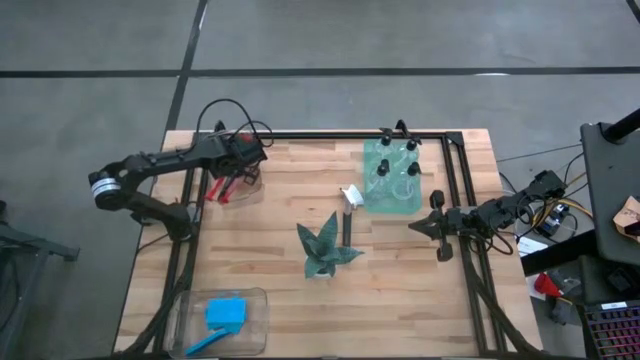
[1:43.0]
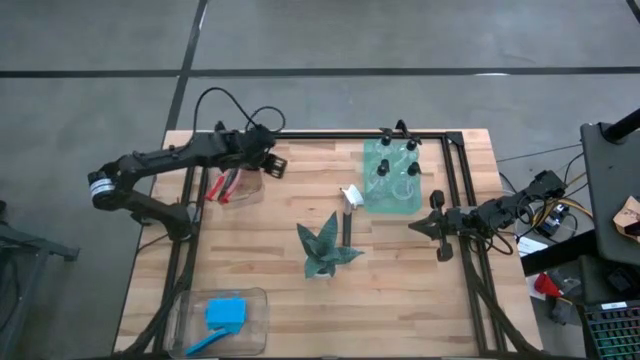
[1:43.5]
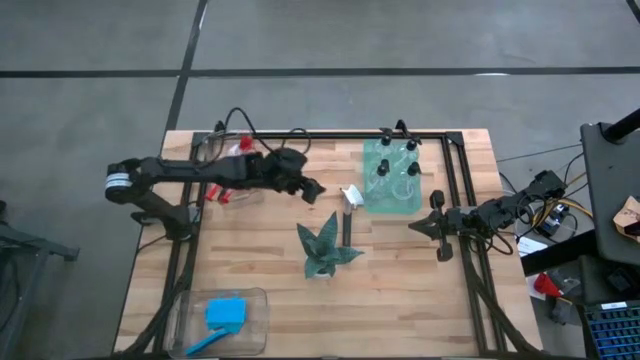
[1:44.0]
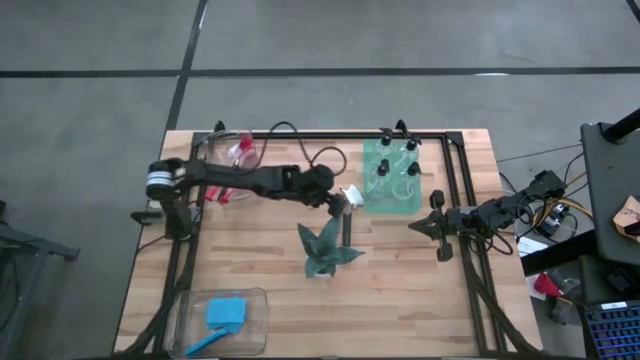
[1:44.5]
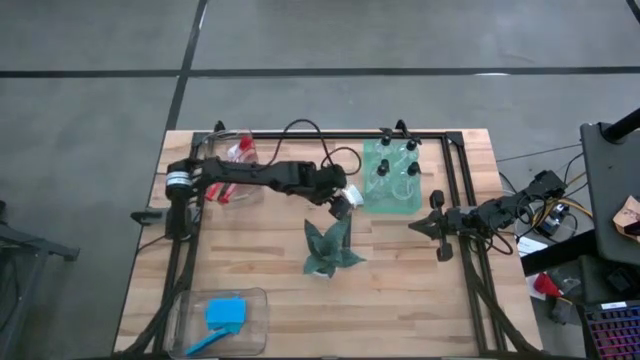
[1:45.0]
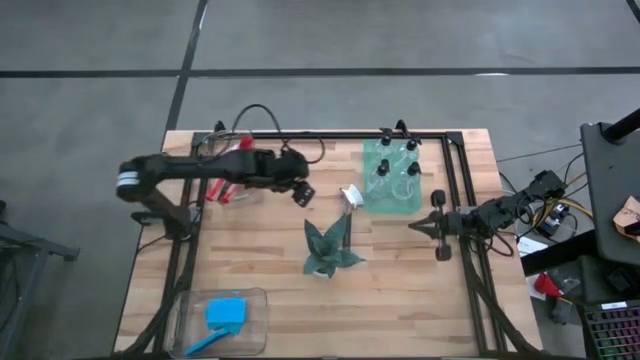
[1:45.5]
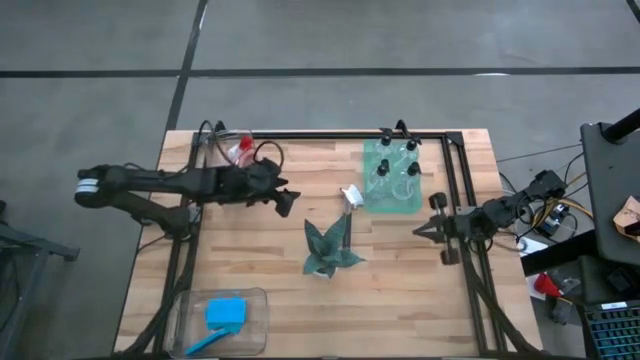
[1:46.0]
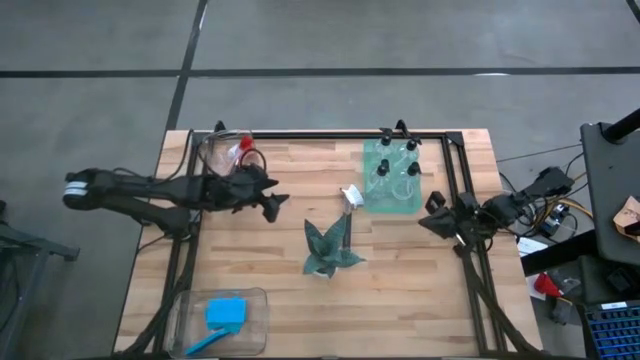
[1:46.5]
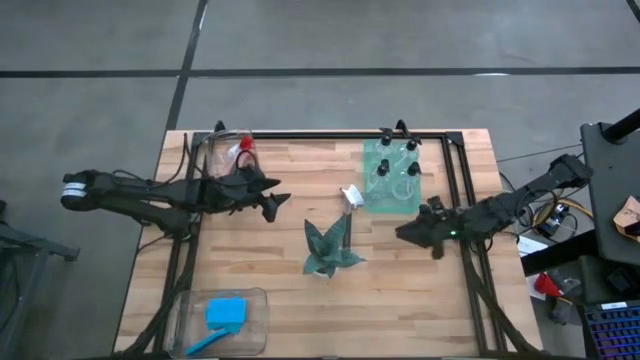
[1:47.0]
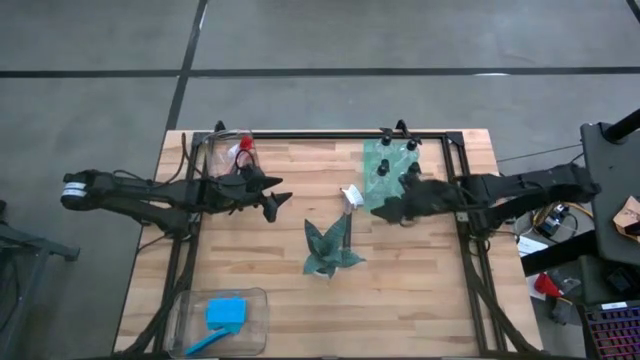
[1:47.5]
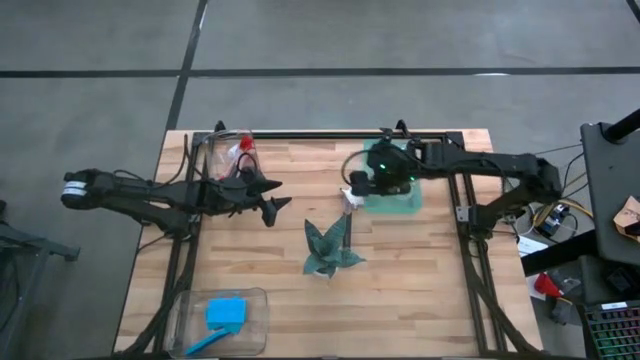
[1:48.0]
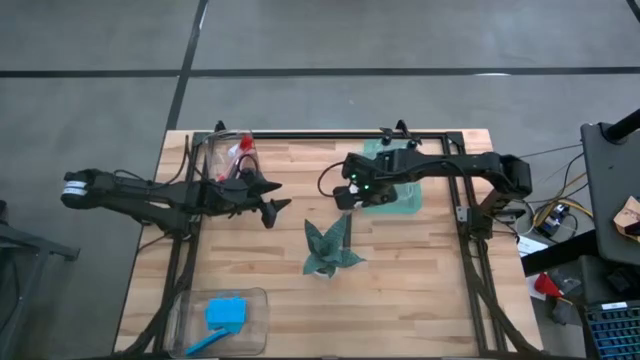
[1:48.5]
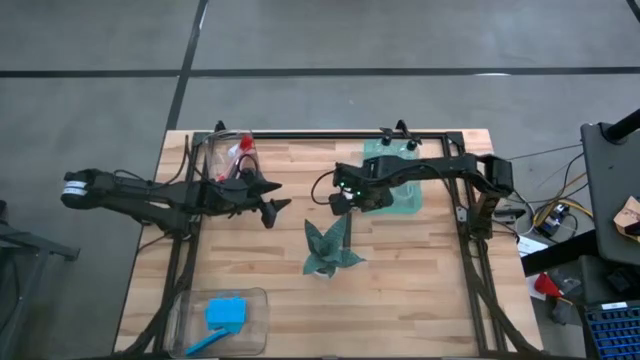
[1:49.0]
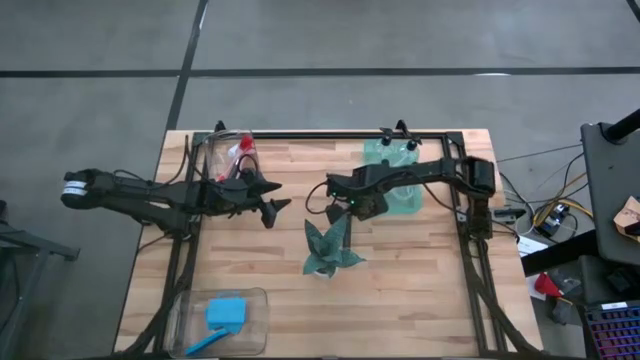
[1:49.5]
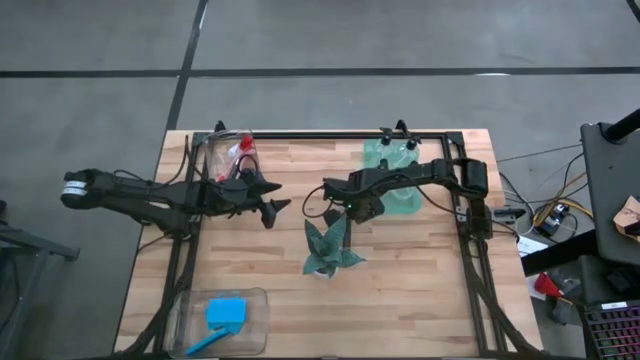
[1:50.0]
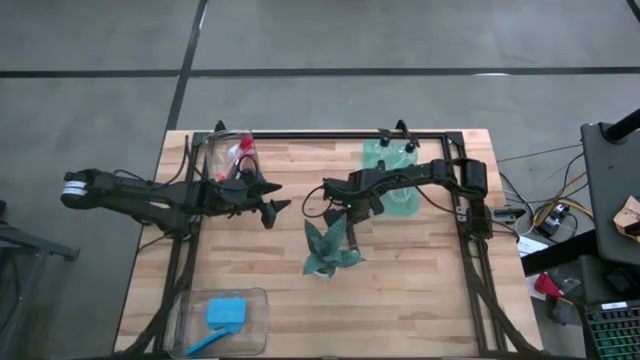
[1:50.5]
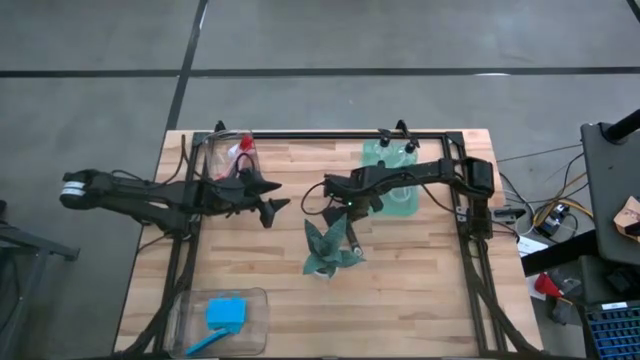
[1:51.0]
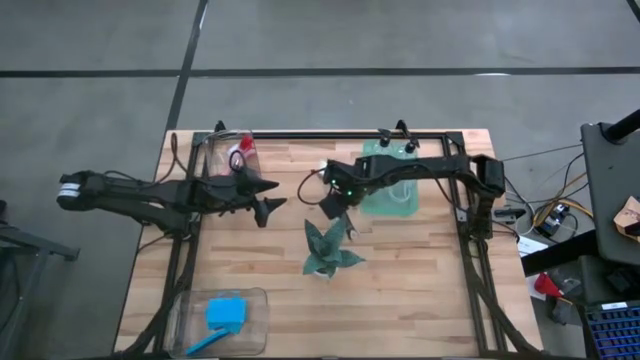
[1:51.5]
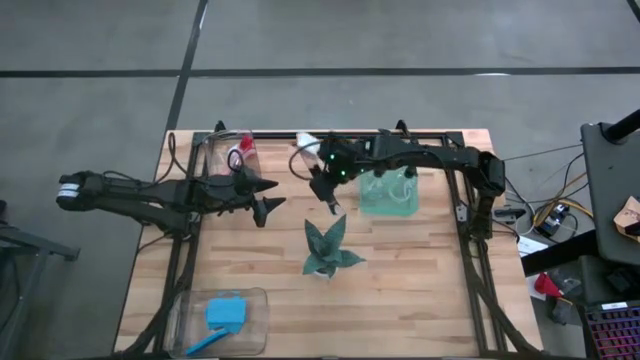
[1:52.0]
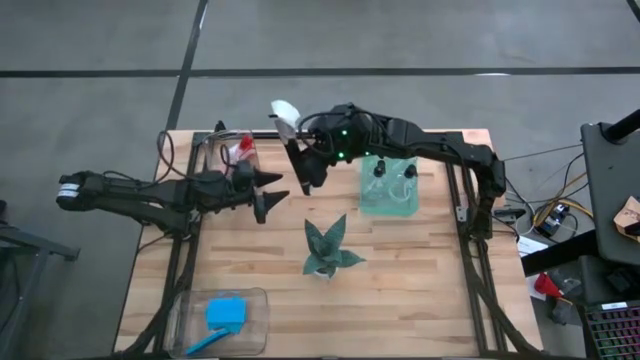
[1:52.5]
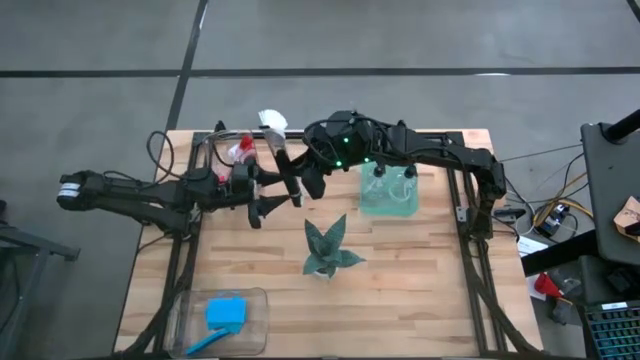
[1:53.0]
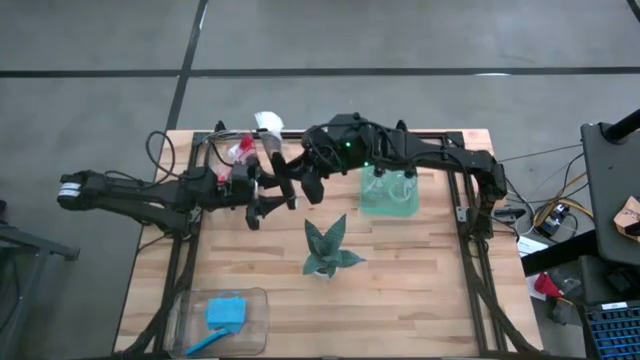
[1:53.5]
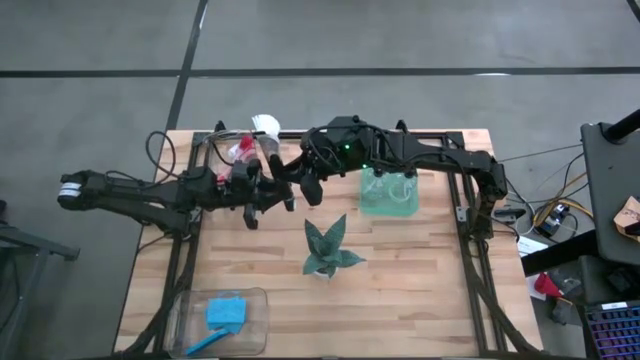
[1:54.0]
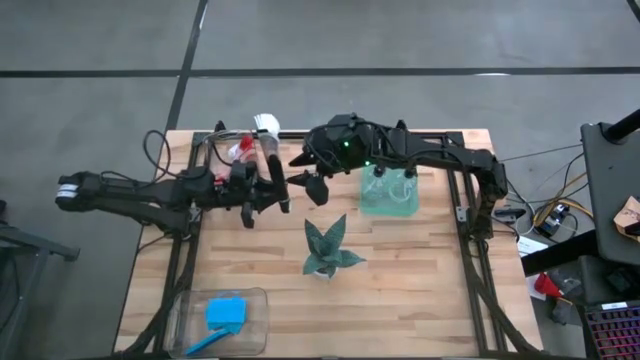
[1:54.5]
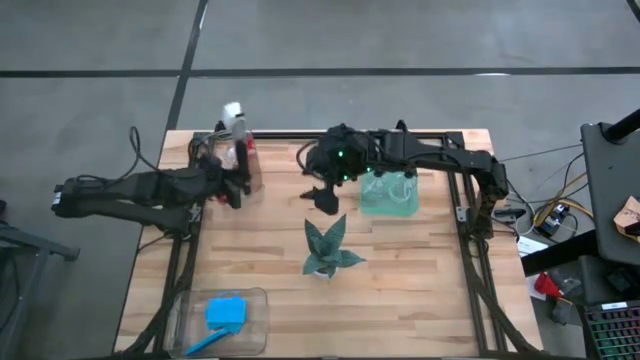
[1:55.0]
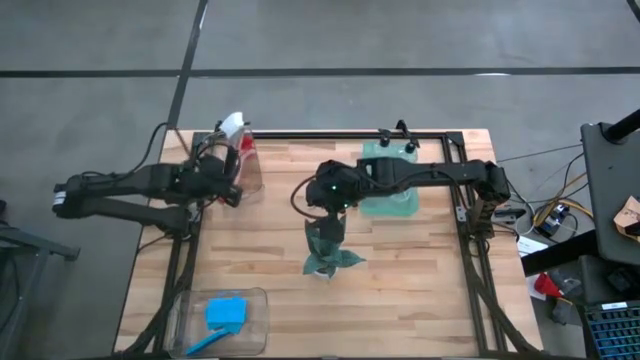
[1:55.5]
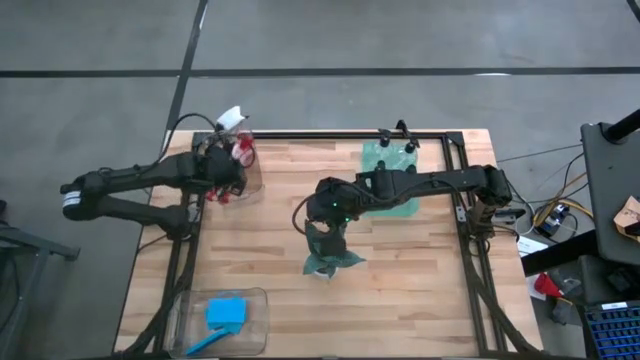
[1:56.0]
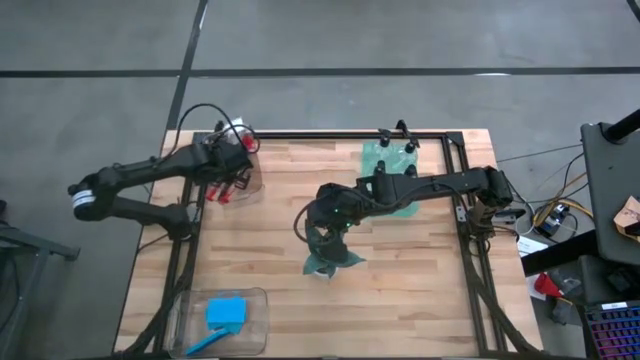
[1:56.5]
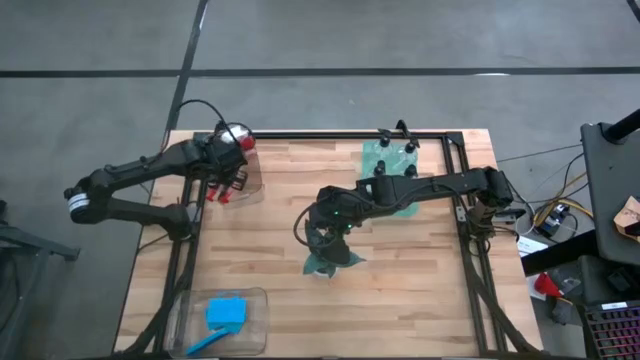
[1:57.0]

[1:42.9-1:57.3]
Task: Pick & Place Kitchen Sink Supplies
Put the black dish brush into the top transparent bin

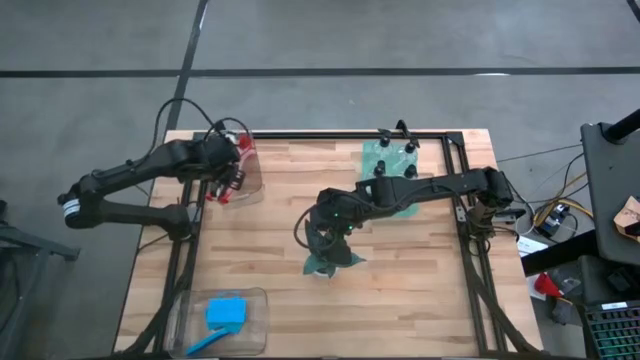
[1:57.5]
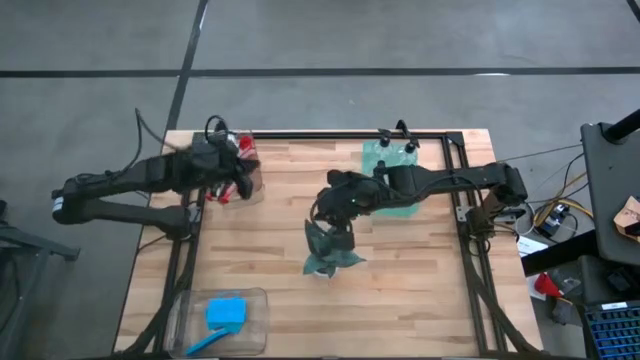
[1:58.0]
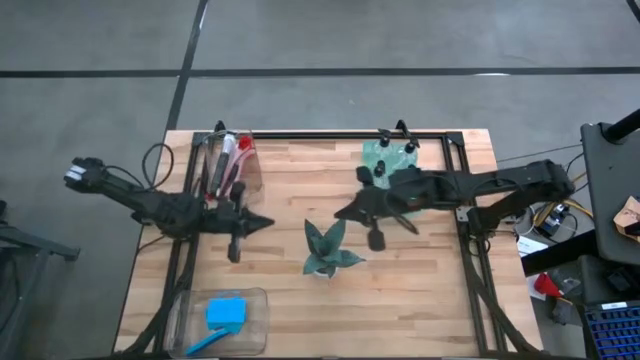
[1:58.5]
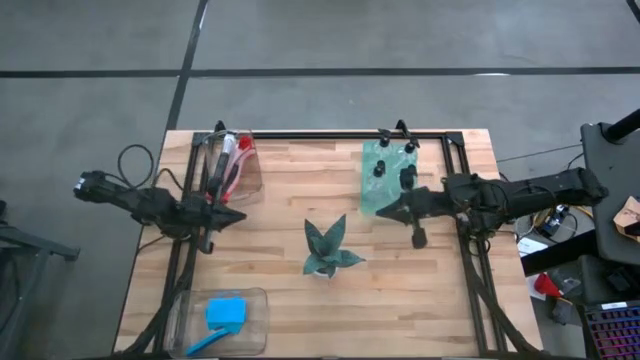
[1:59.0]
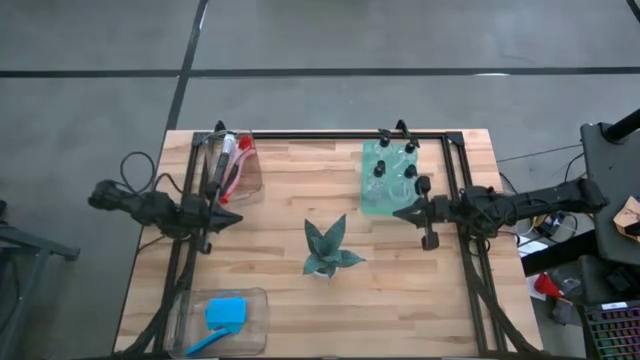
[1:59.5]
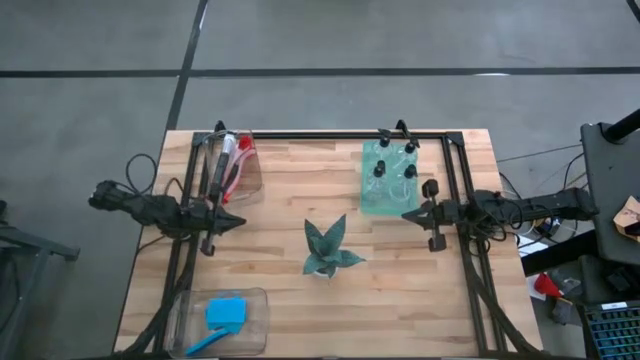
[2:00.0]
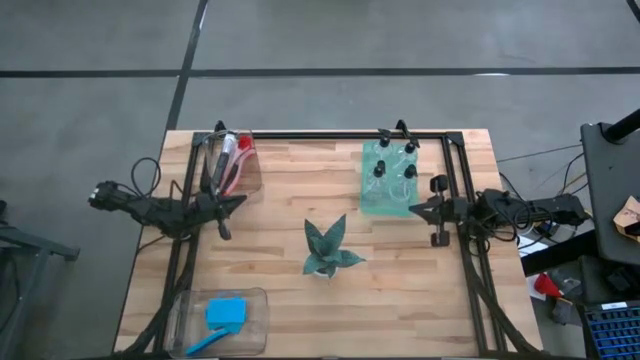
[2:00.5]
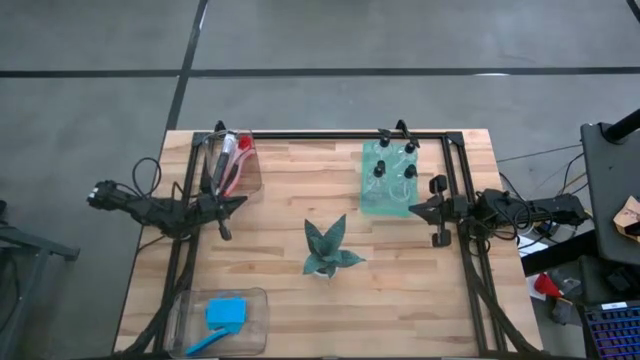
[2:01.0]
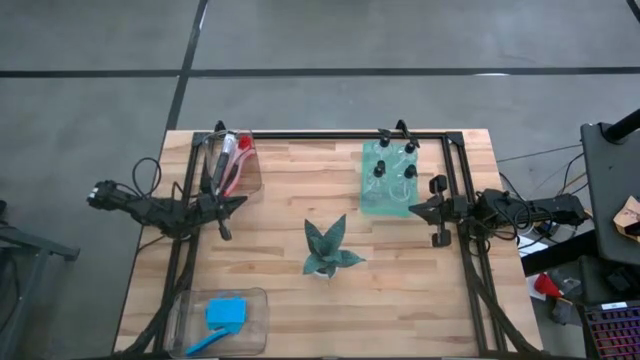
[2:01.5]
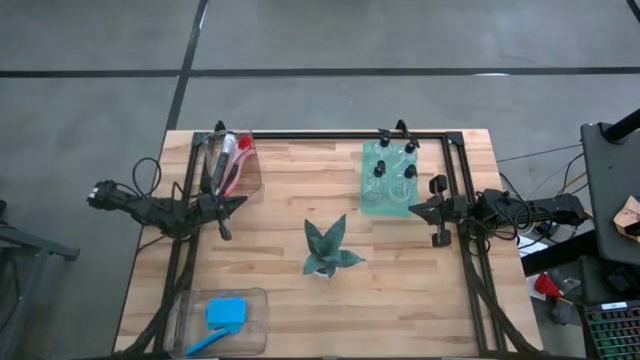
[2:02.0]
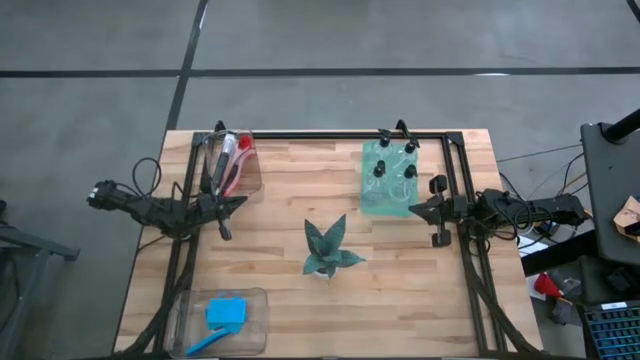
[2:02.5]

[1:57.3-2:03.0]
Return to Home Position
